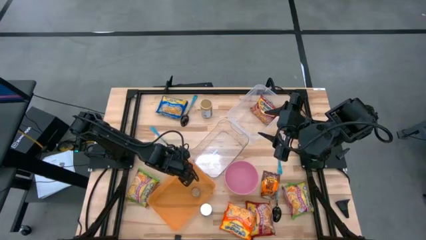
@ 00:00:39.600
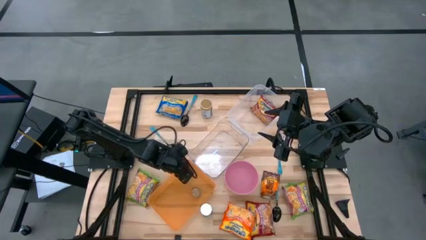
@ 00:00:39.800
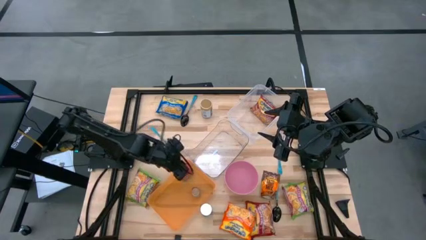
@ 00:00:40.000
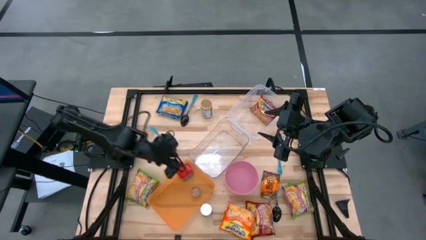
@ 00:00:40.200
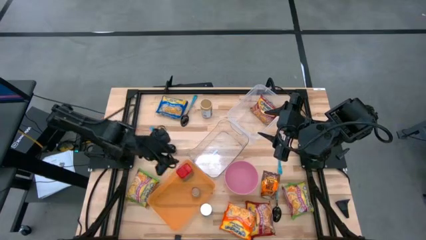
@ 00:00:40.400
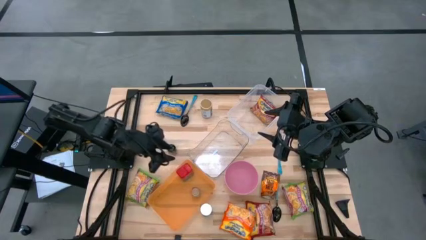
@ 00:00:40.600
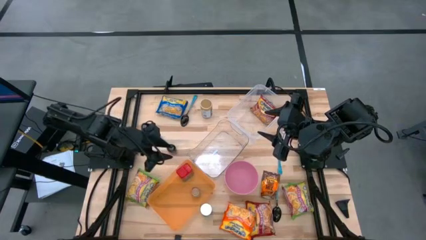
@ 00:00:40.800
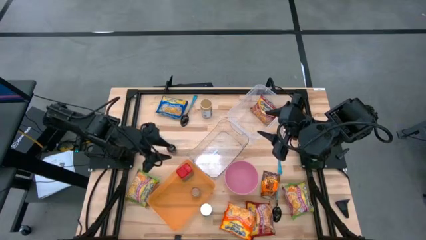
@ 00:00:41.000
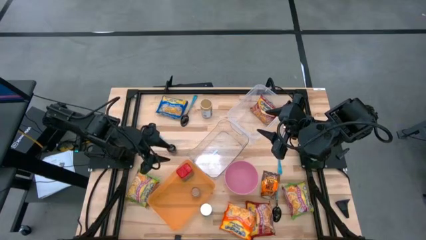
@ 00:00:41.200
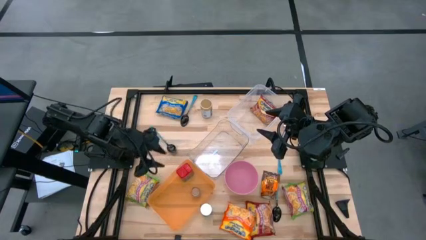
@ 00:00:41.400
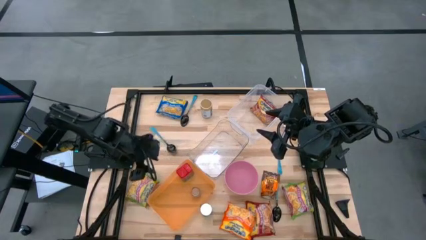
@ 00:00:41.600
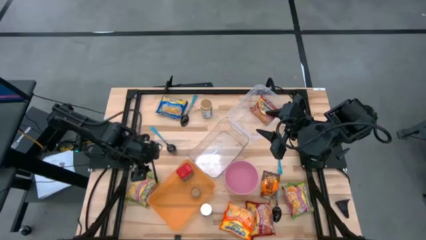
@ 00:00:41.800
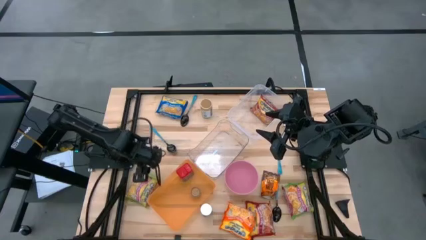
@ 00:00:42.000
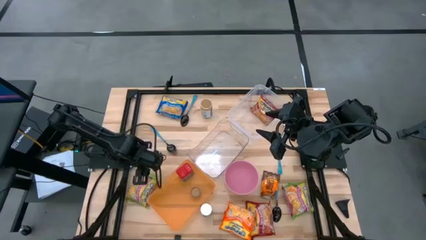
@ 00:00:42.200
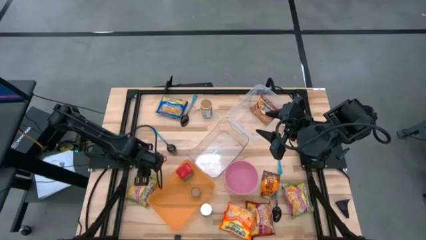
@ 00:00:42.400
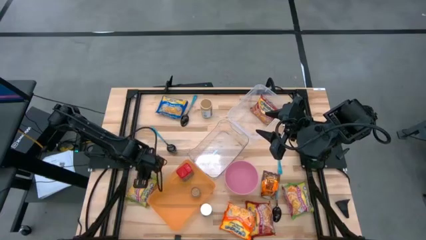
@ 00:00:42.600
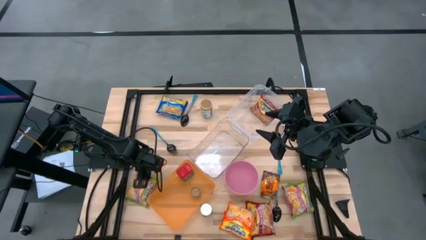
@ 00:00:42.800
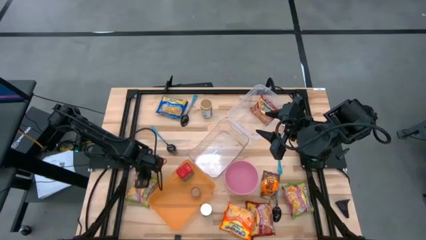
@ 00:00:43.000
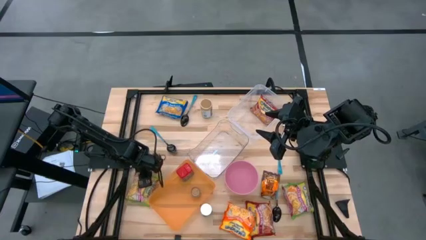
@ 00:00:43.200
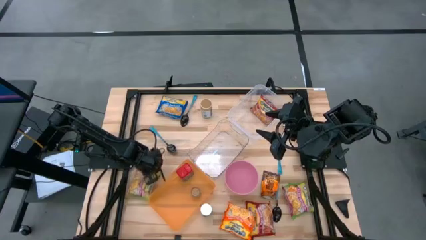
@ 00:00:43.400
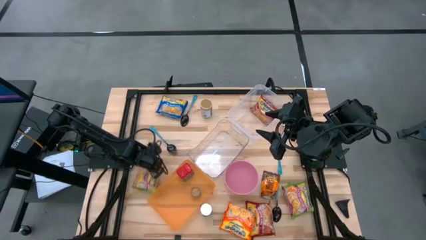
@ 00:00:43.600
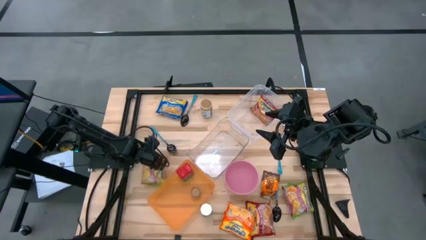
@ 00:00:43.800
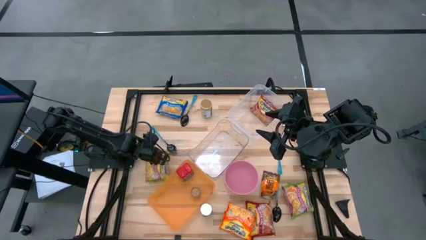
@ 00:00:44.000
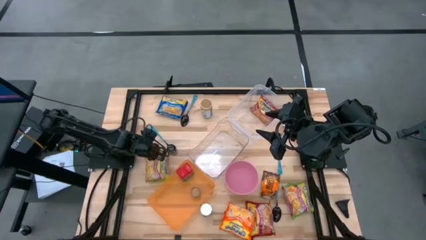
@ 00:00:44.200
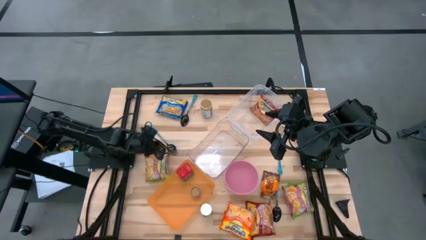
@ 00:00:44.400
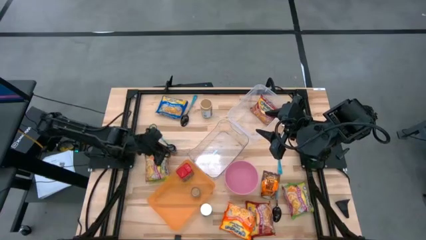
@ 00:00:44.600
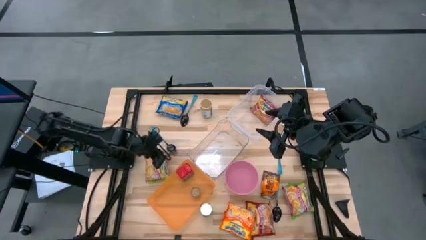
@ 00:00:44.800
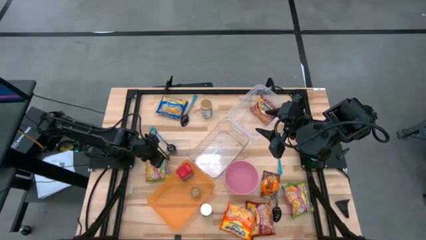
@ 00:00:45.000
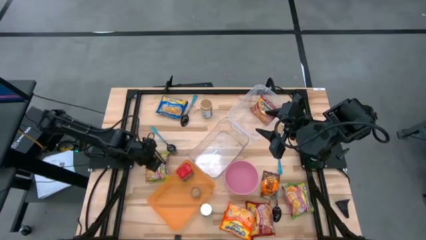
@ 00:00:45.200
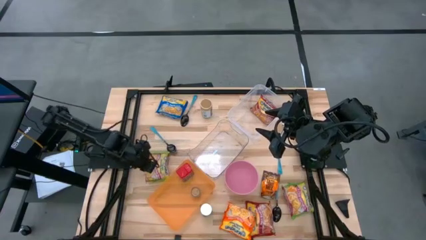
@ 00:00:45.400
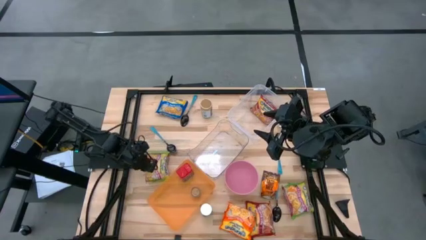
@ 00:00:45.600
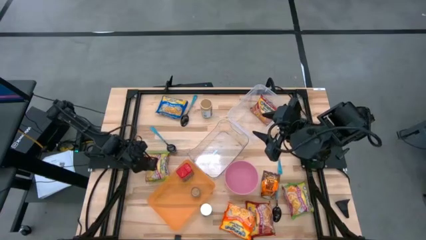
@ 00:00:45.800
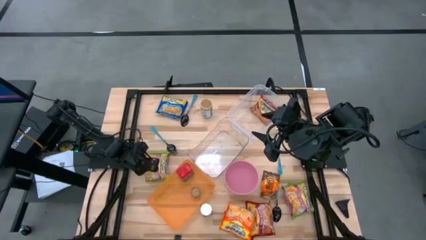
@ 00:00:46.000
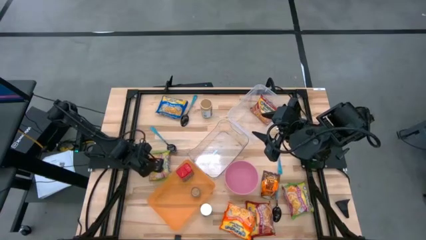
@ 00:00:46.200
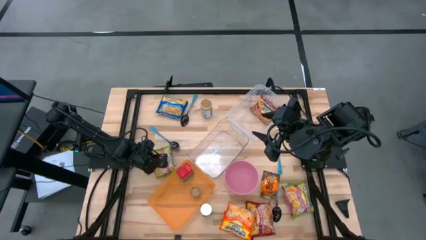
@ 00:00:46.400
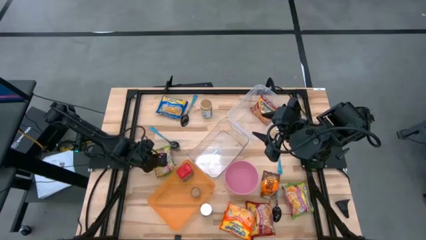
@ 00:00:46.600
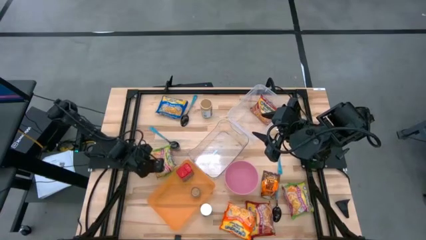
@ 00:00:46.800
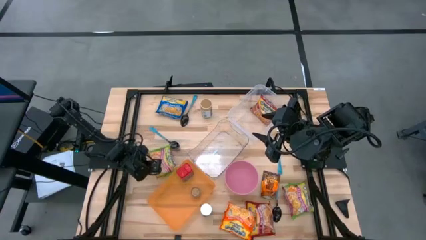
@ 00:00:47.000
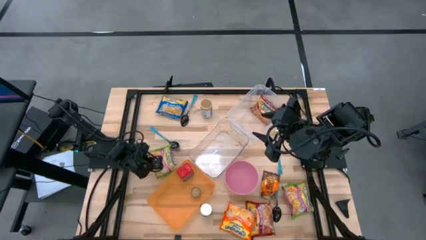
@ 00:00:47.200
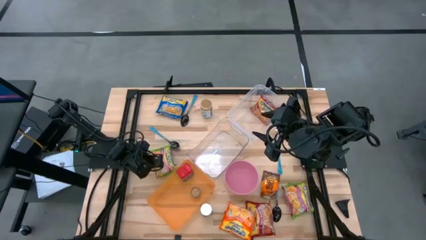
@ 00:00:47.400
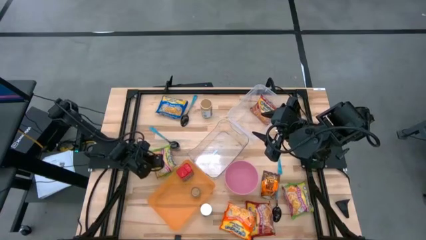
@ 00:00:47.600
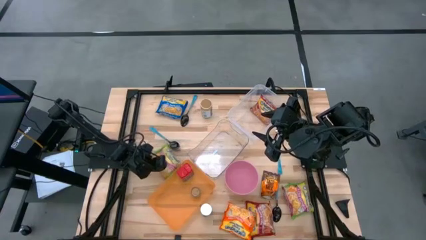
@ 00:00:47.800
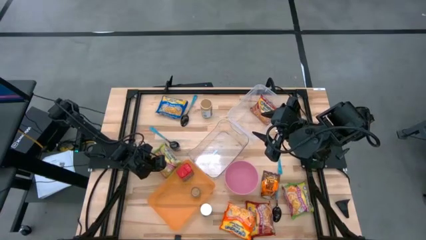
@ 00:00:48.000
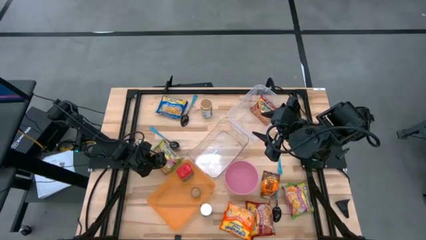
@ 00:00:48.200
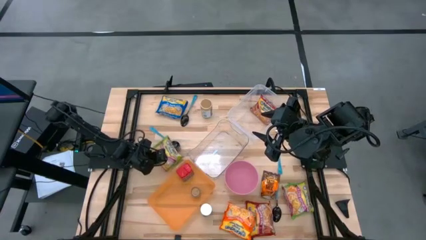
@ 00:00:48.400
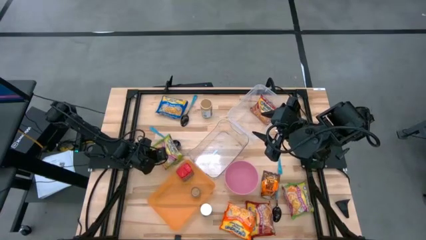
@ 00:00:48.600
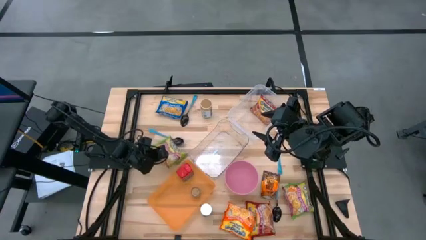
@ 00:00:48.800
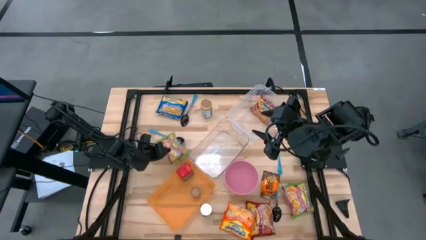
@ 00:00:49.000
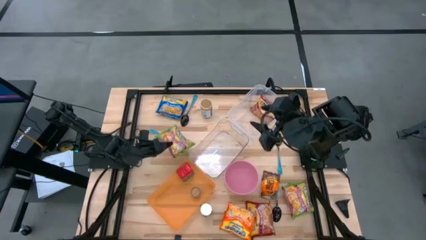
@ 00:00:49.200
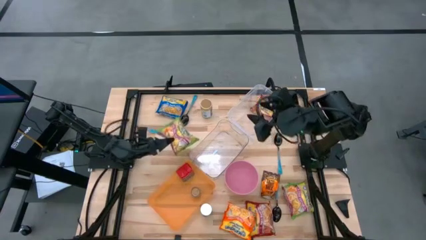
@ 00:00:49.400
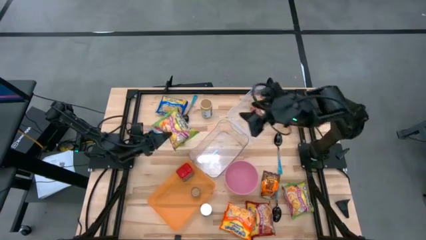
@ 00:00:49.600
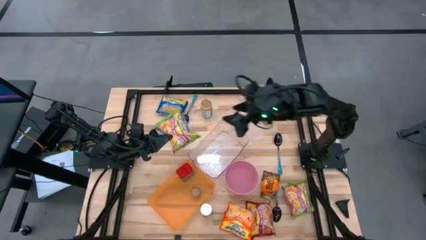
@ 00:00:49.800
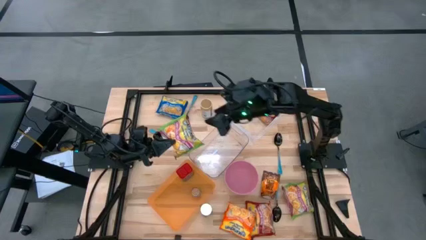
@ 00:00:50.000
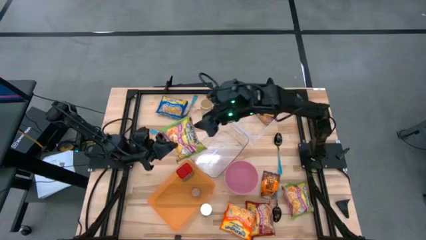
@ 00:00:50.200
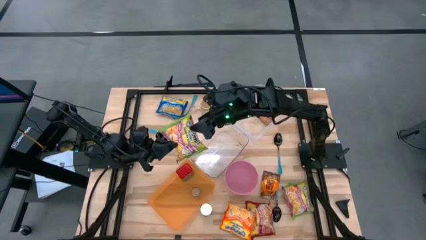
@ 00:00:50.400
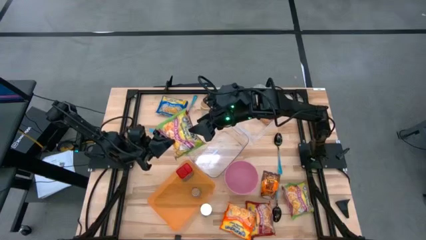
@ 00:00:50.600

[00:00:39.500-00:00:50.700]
Task: Pick & Place Food Item
Put the green noodle pack into the transparent container
